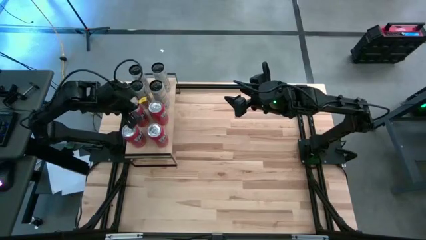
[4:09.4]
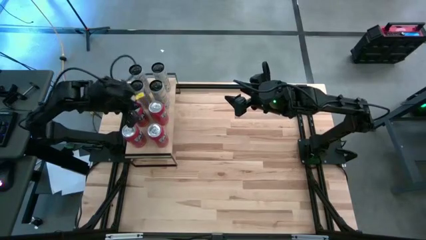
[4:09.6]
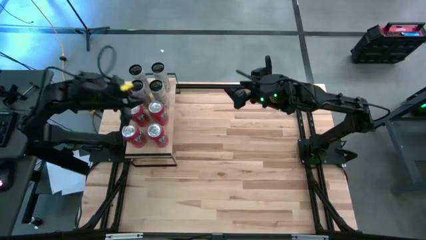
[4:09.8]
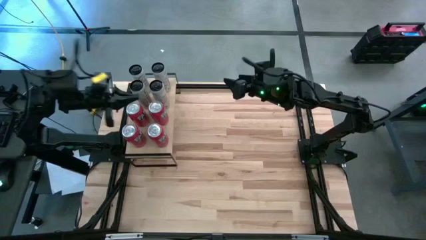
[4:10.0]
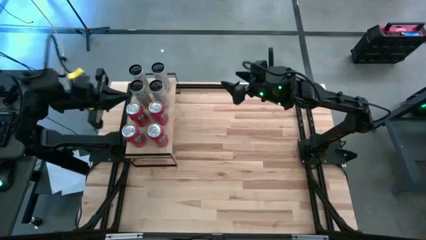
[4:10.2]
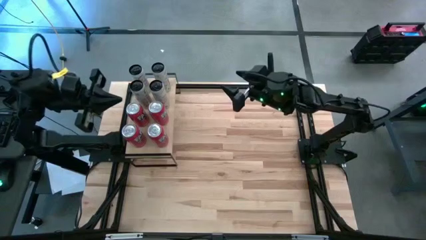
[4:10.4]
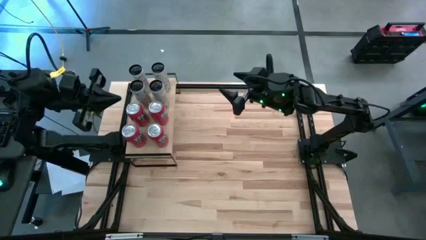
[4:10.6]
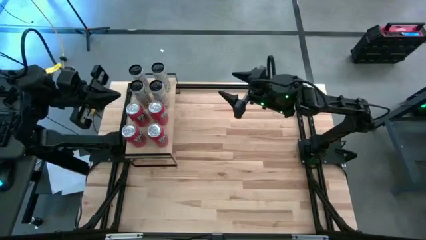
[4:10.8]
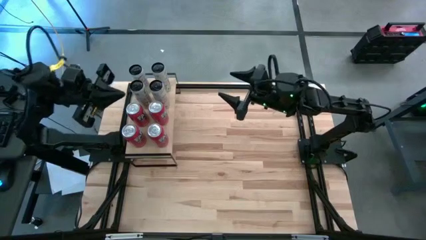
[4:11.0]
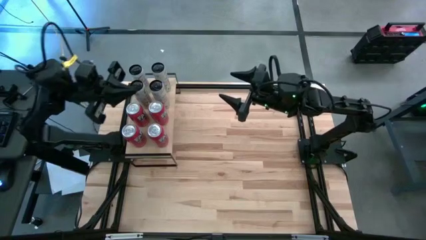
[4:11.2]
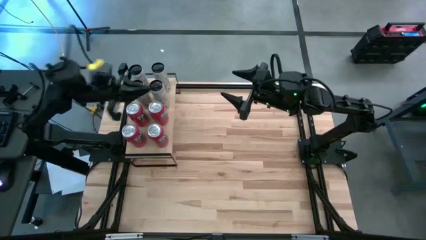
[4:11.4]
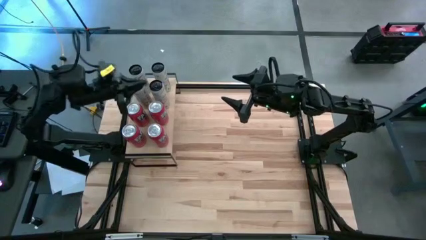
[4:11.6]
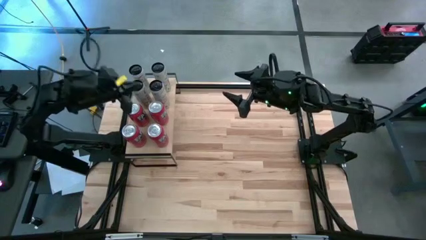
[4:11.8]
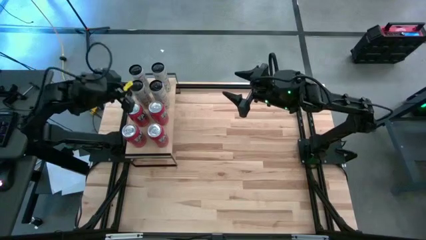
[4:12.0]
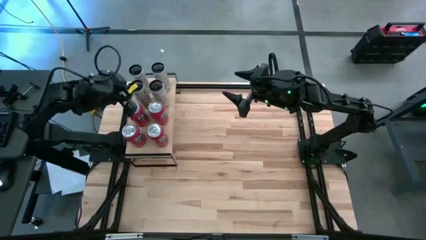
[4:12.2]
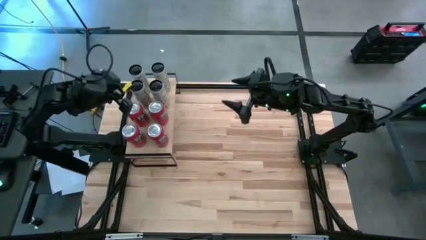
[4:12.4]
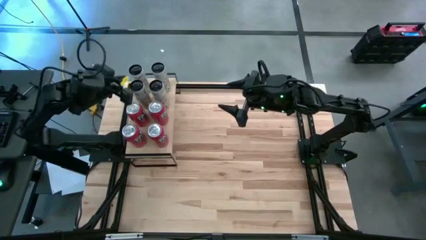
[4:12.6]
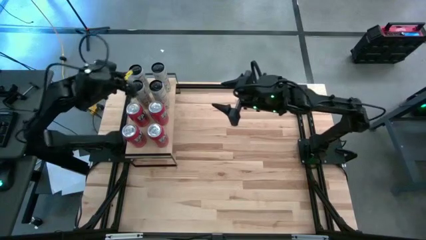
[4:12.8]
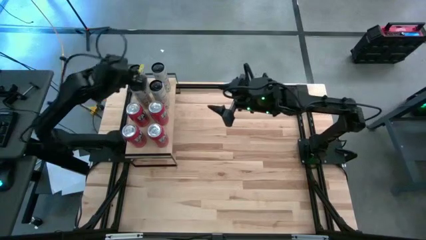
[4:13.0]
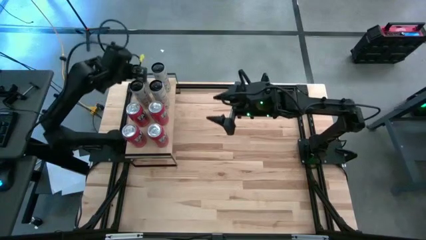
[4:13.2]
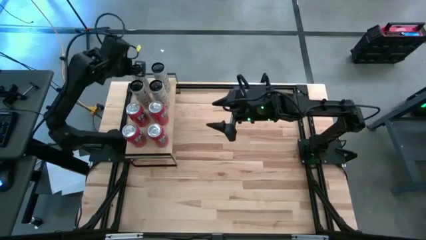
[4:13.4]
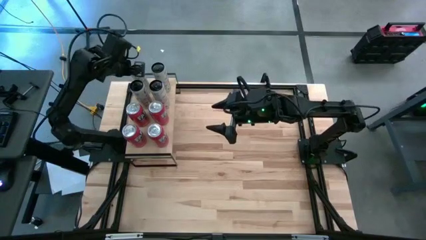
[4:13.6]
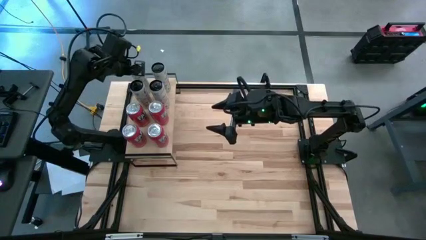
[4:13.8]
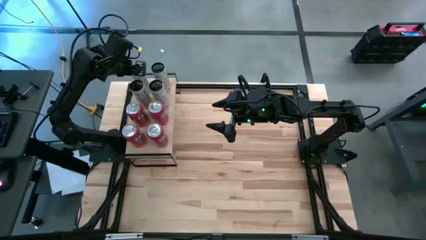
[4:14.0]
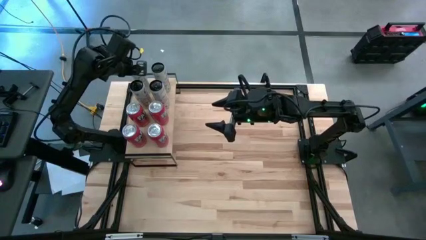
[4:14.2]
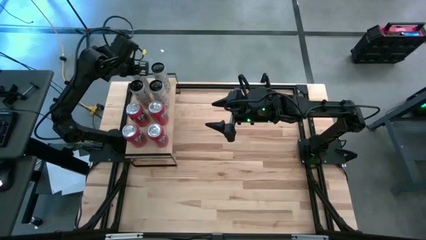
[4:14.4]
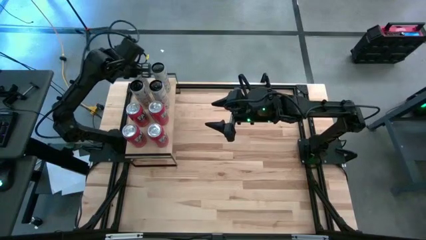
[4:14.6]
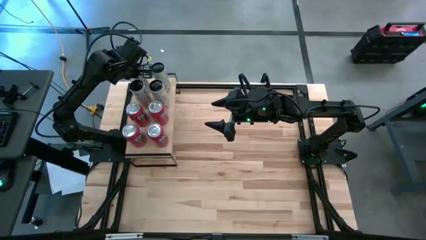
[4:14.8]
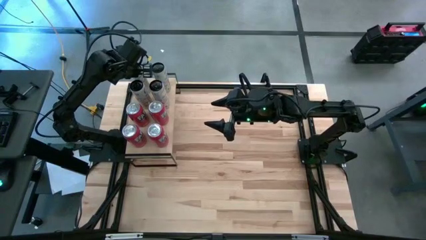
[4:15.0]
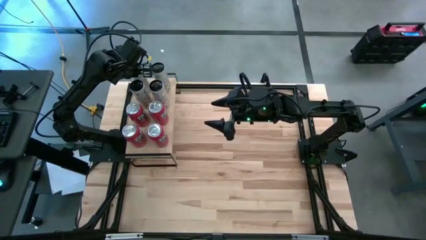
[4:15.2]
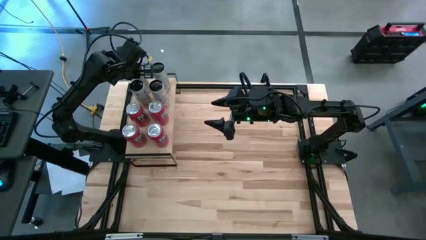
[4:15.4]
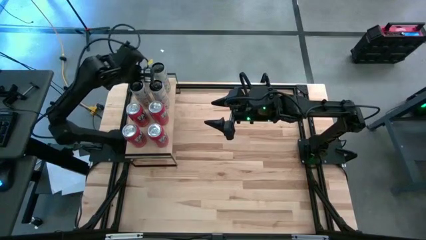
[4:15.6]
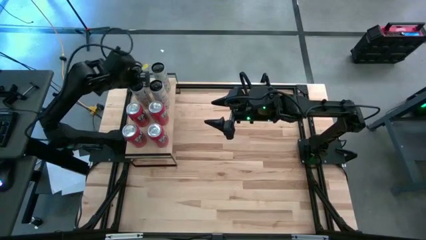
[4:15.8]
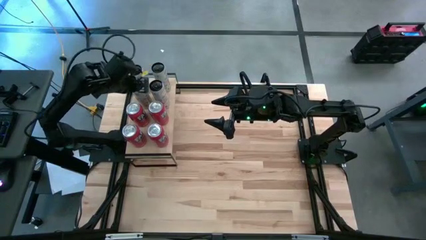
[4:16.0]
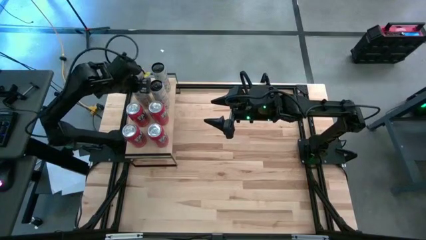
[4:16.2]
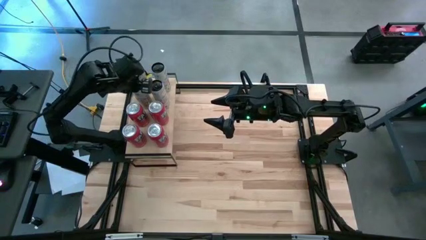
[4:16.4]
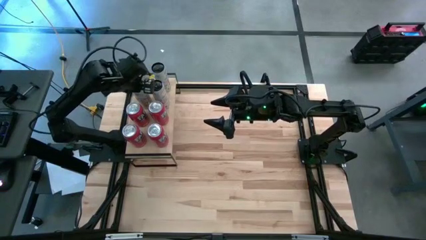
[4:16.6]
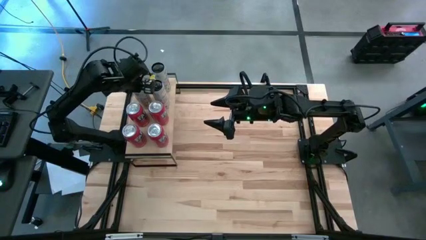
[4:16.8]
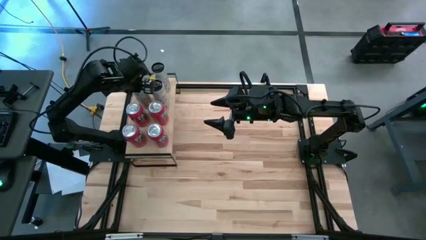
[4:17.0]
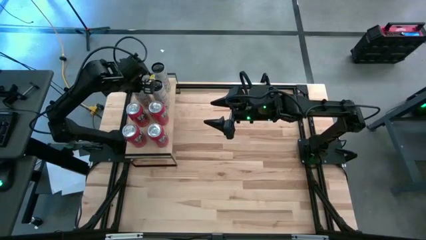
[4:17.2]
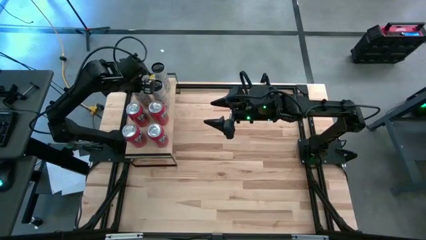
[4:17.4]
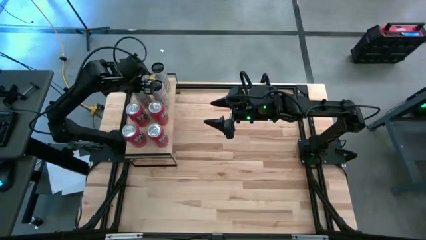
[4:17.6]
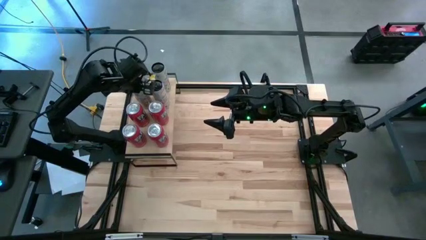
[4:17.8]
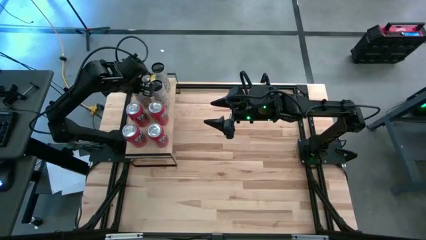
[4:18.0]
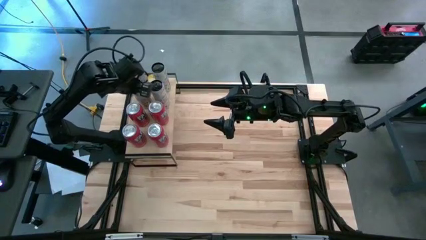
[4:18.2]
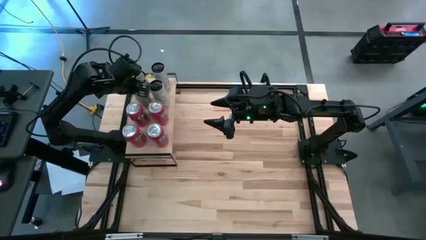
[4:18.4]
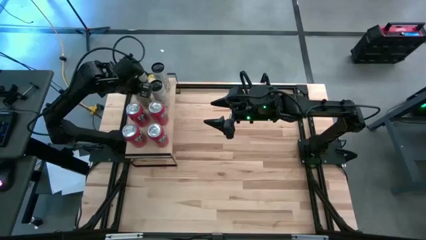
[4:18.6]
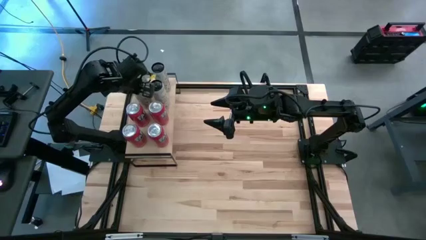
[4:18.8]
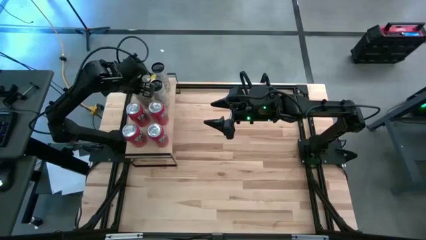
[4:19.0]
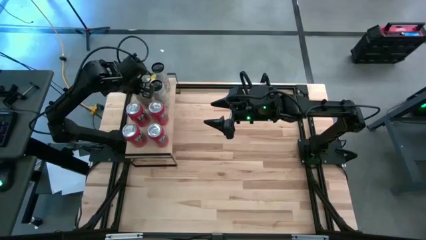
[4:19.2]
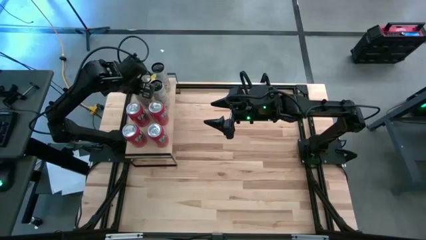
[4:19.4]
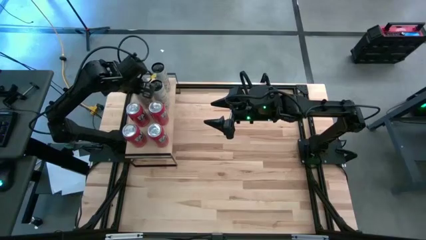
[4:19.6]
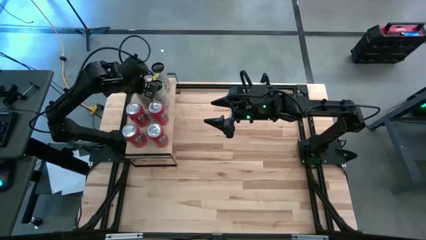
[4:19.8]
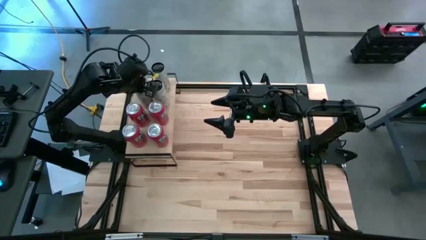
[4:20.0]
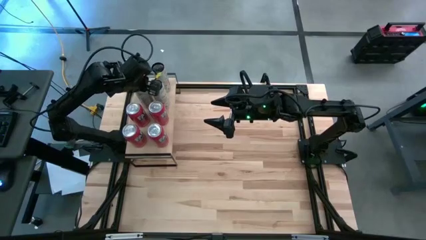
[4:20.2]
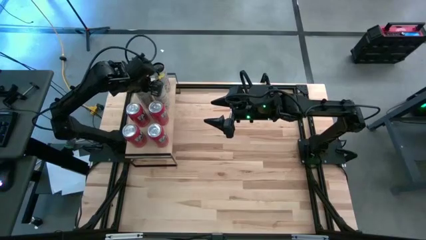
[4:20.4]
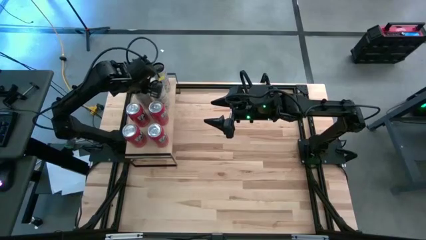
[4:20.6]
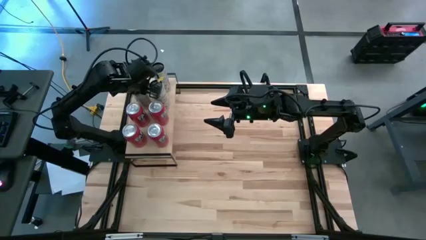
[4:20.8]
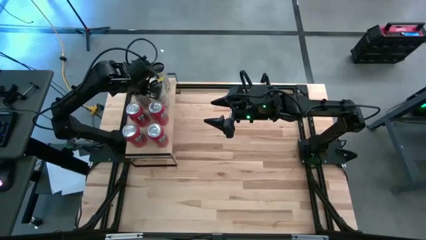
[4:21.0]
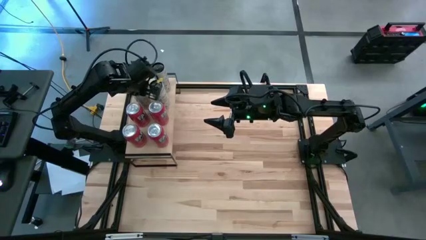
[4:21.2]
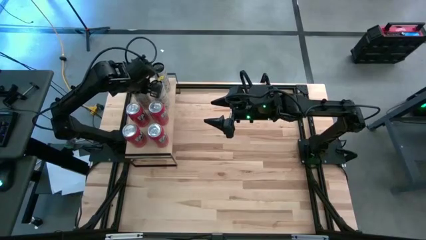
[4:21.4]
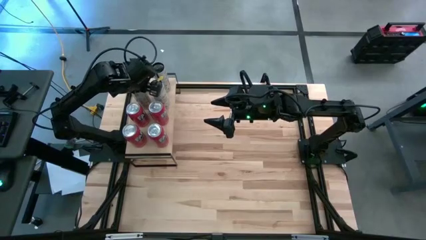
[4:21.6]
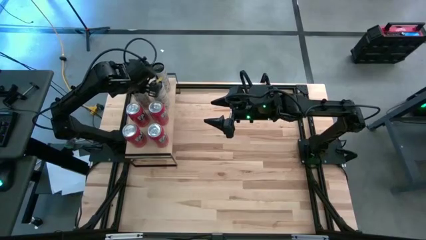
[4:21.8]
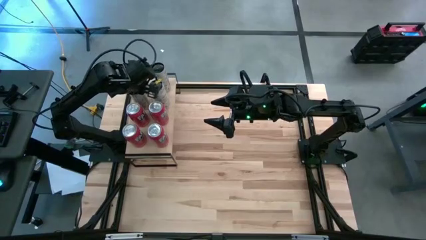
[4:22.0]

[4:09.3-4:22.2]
Task: Place canned beverage on shelf
Adjust the white yellow soda cans
